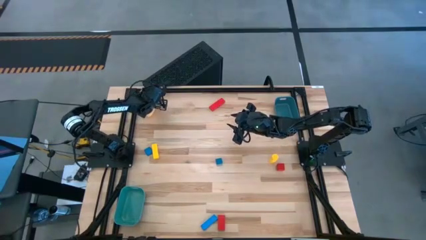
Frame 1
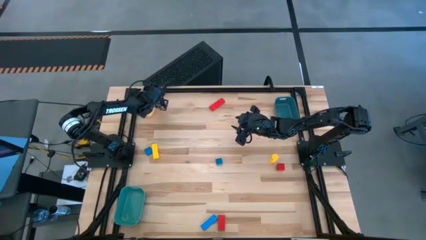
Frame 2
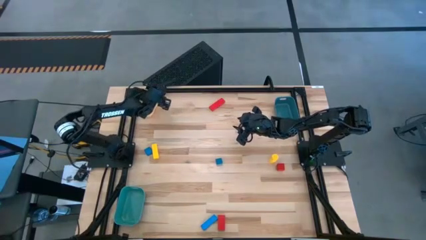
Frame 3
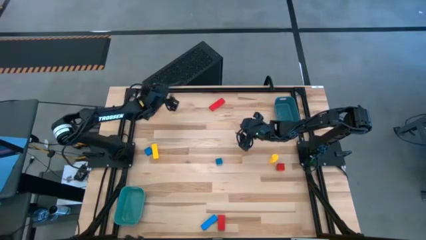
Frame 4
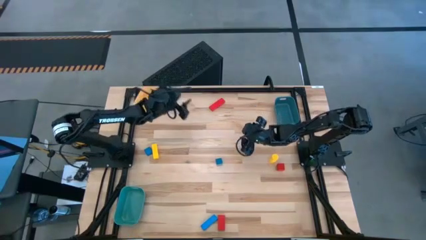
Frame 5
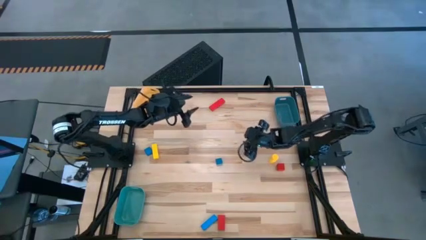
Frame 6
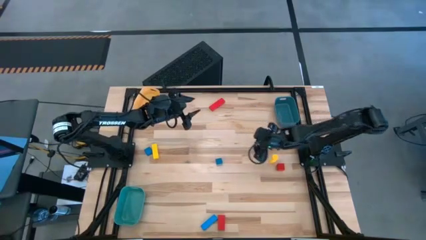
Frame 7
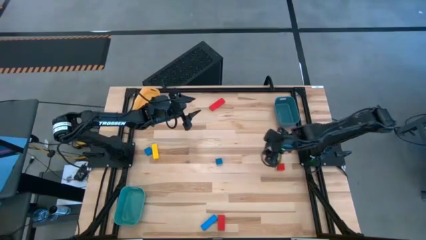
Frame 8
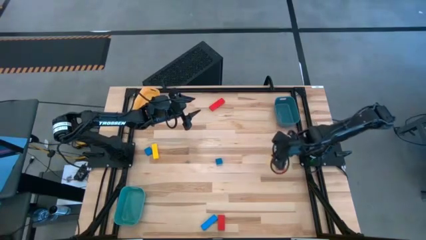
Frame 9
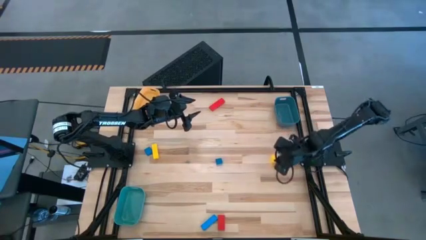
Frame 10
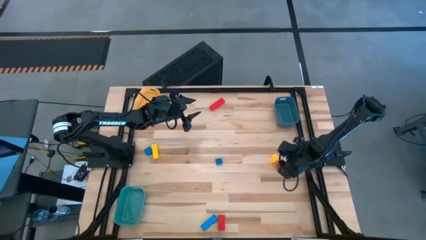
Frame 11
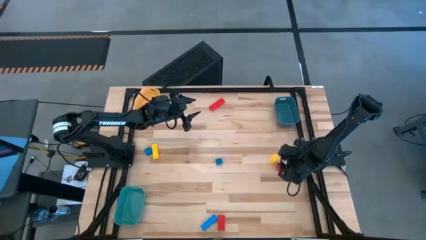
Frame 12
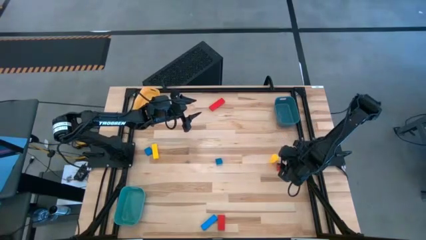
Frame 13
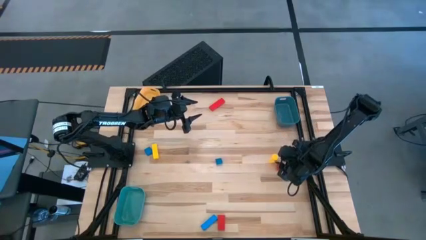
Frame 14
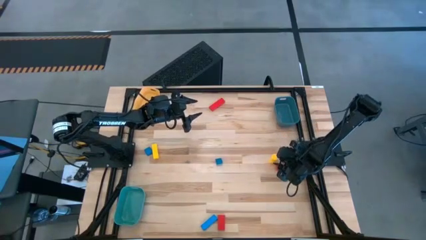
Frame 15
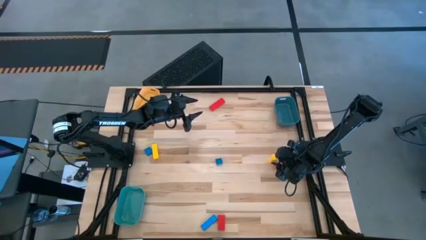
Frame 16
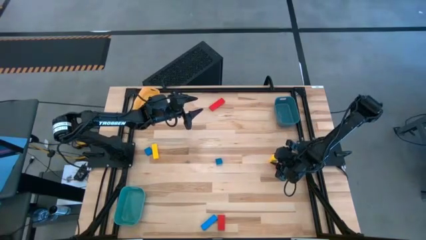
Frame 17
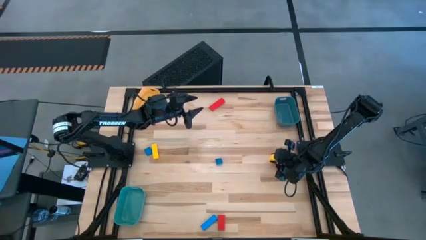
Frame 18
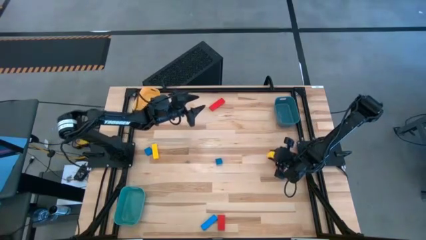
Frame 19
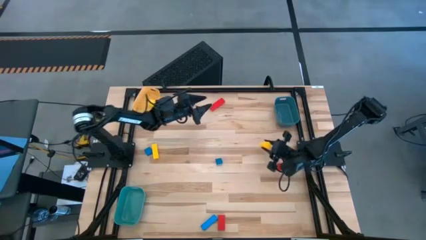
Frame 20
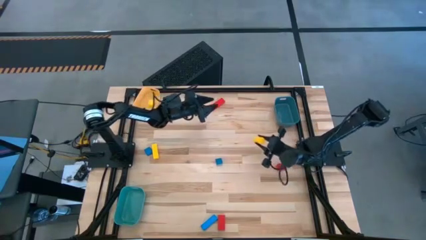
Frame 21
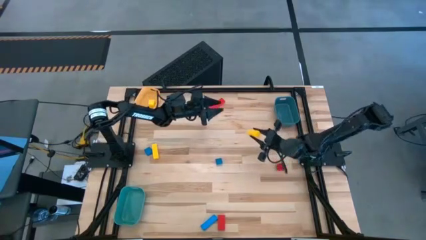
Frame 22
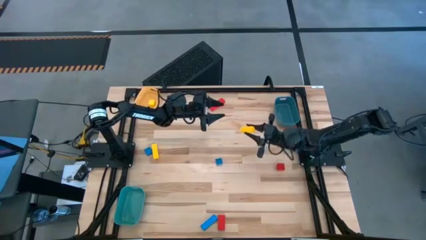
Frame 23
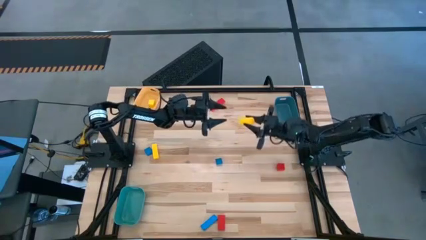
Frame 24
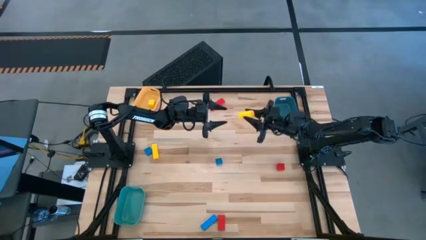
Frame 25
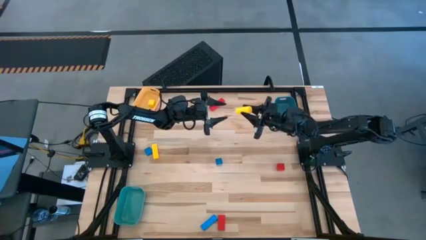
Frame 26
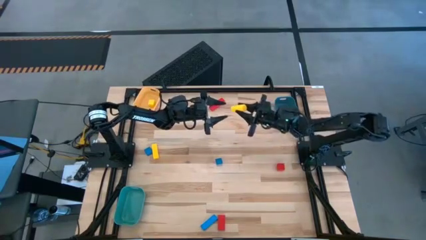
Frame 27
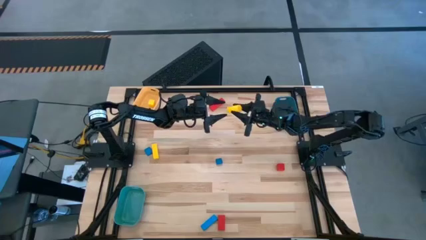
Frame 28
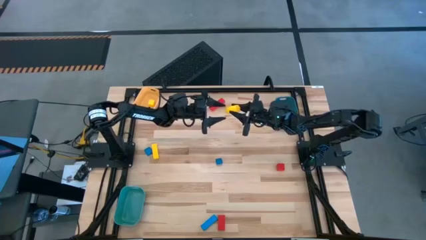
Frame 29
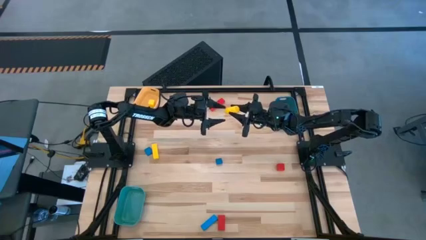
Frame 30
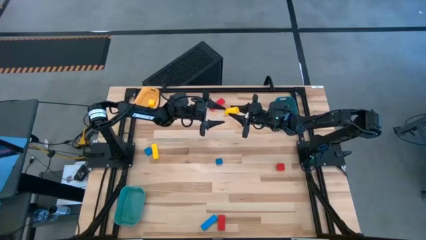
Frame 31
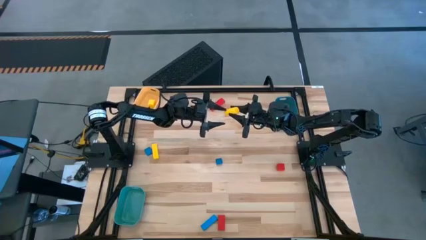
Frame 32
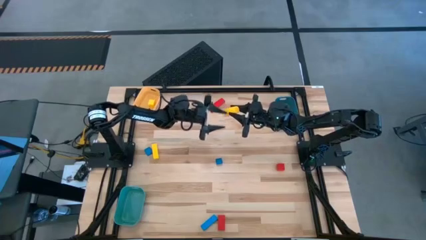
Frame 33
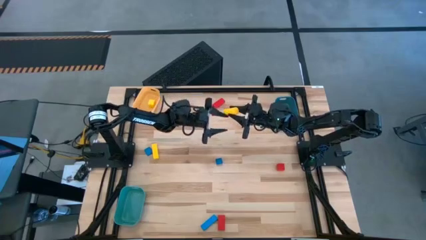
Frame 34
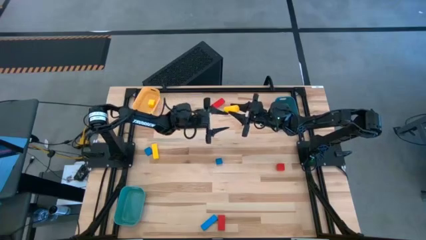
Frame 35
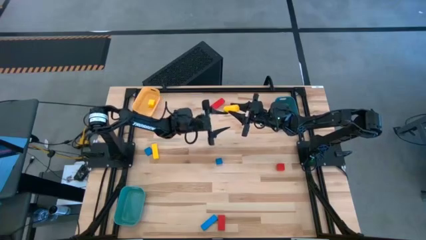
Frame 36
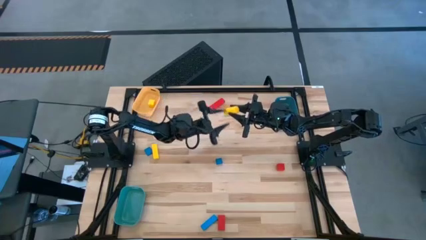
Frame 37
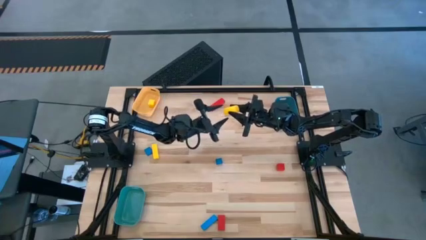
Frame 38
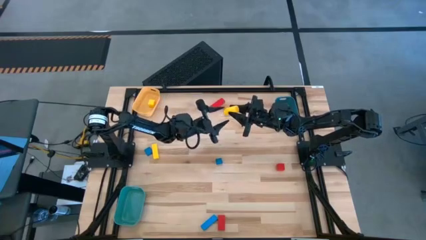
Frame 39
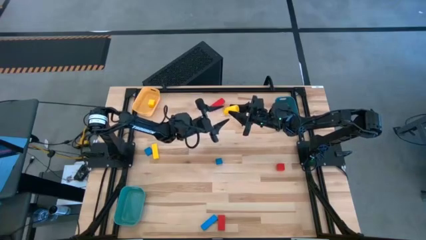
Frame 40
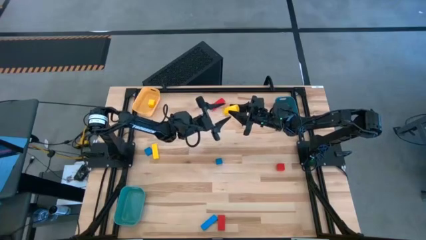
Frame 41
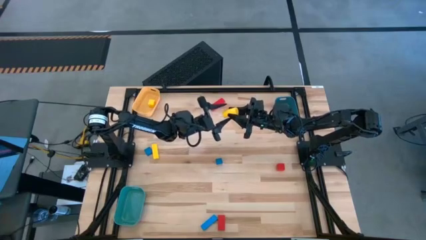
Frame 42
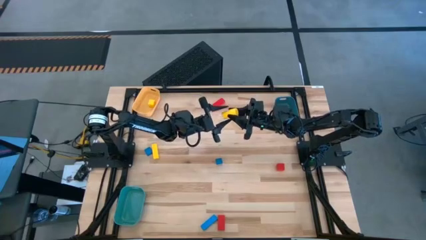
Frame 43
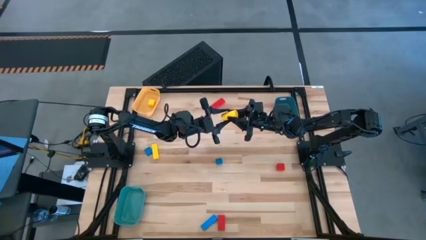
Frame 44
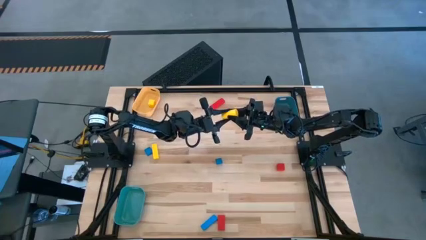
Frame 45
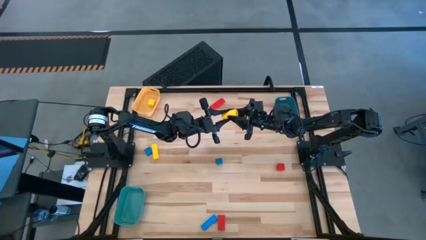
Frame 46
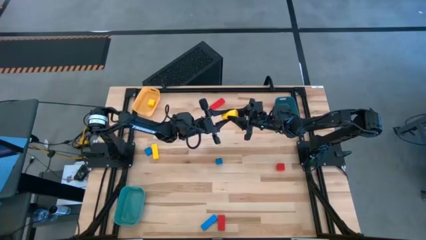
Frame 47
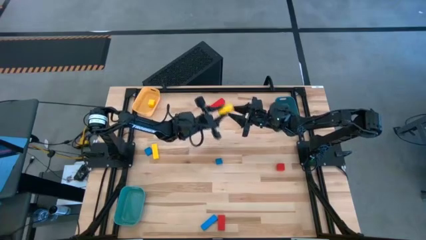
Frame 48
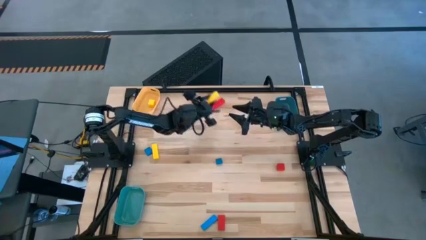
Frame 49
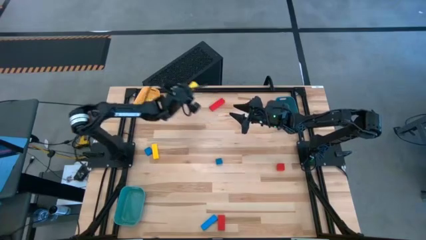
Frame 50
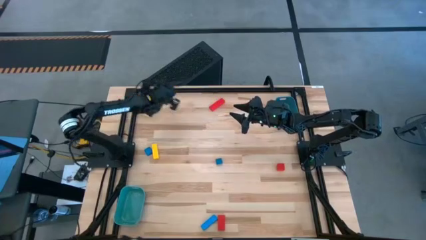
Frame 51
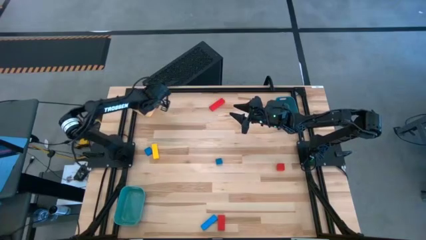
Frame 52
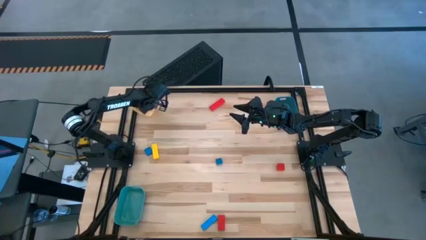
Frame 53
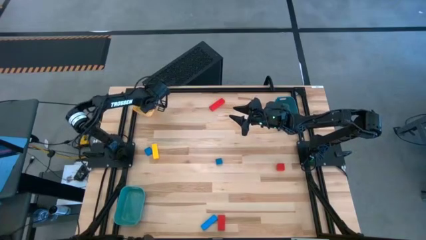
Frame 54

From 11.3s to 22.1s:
Task: Sort & place blocks by color
Put the right yellow block into the yellow bin

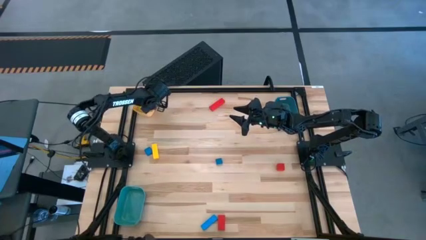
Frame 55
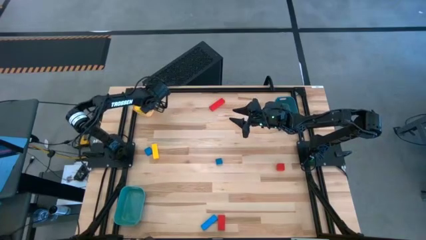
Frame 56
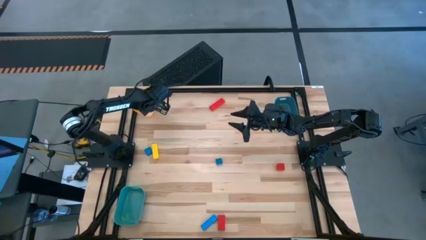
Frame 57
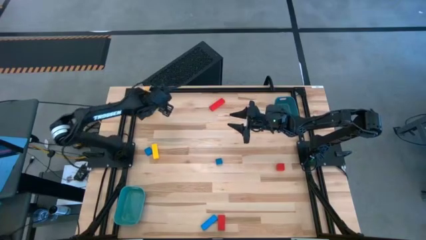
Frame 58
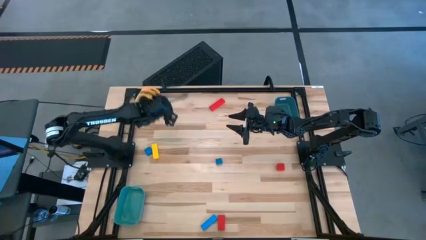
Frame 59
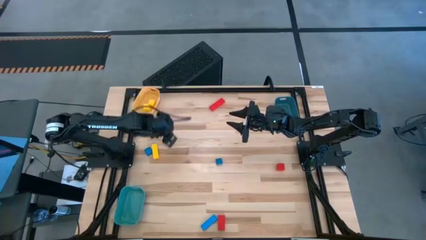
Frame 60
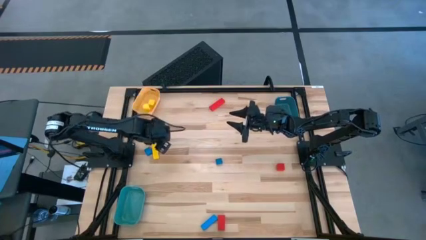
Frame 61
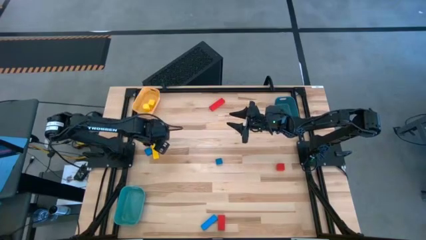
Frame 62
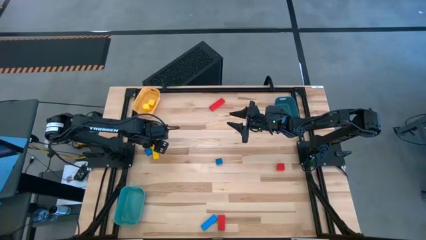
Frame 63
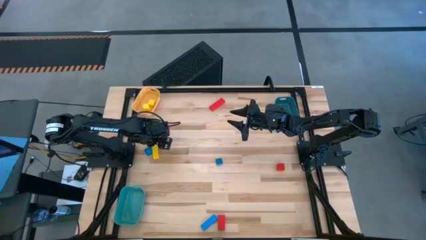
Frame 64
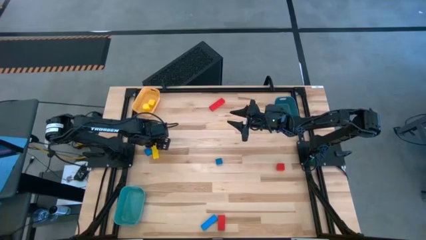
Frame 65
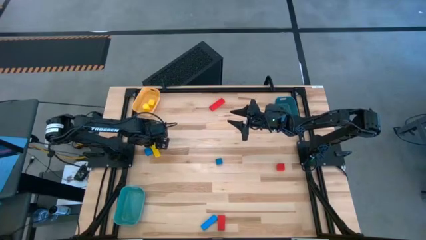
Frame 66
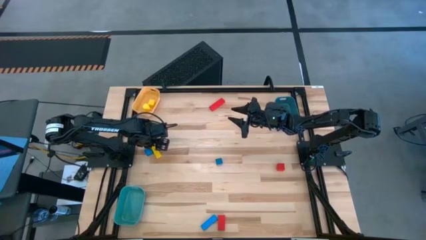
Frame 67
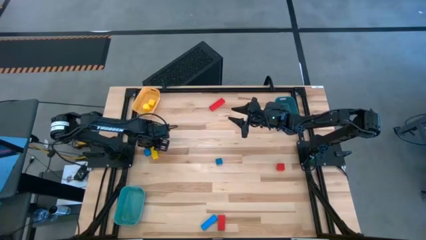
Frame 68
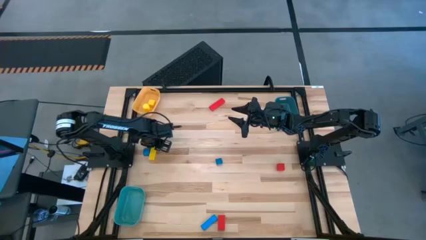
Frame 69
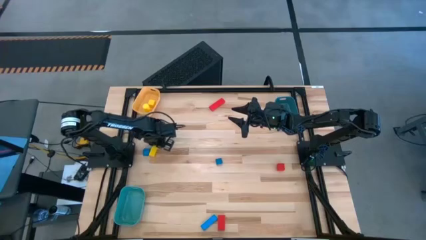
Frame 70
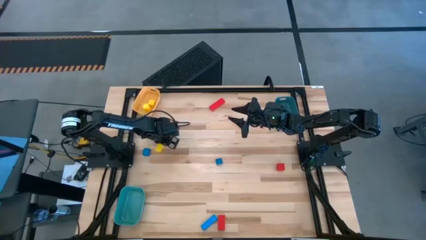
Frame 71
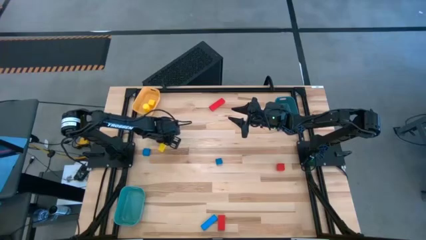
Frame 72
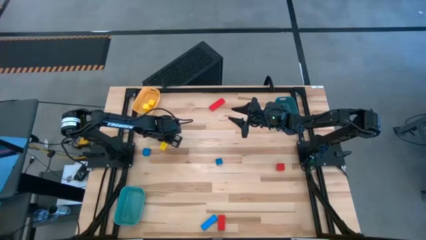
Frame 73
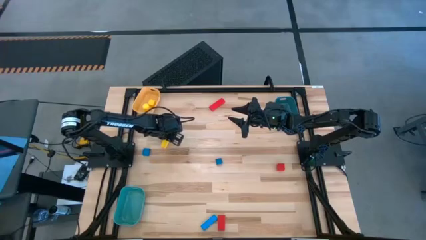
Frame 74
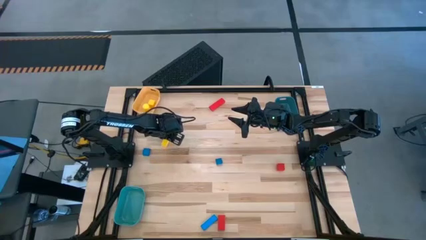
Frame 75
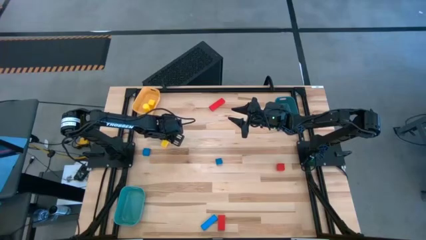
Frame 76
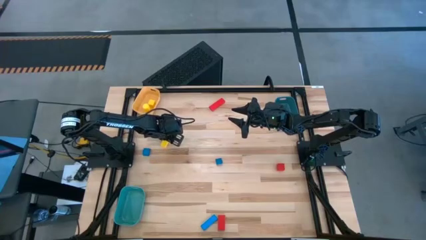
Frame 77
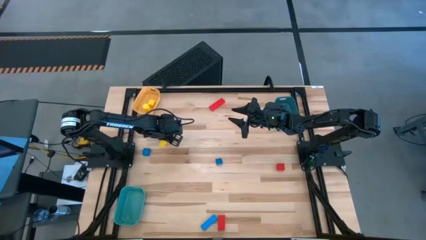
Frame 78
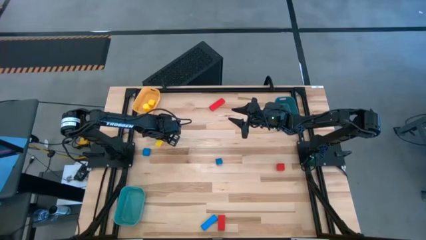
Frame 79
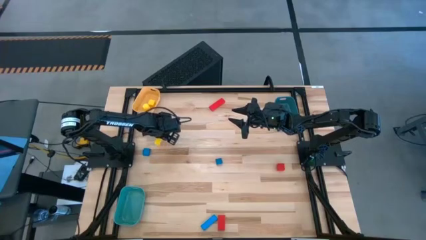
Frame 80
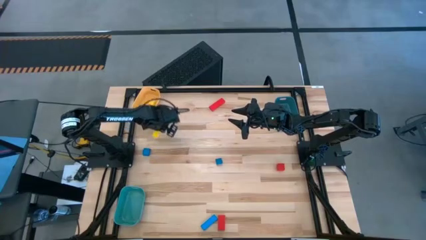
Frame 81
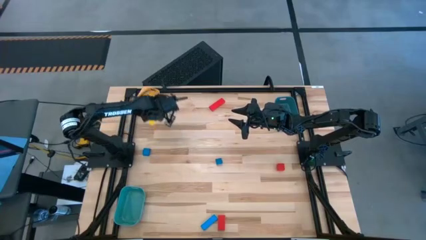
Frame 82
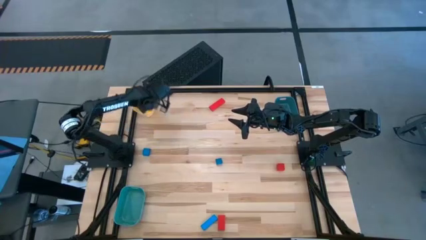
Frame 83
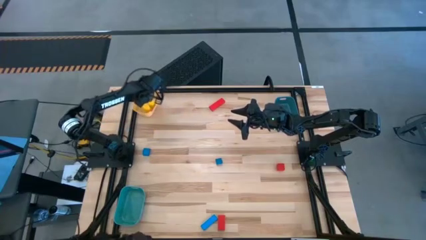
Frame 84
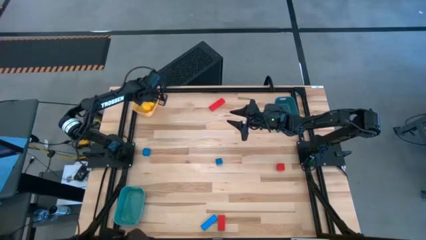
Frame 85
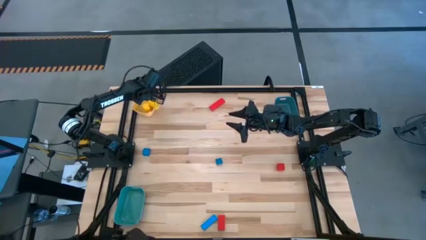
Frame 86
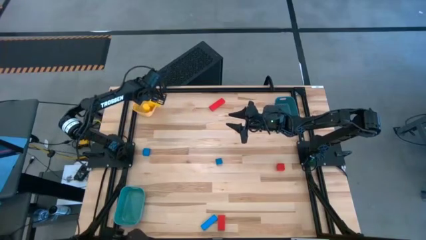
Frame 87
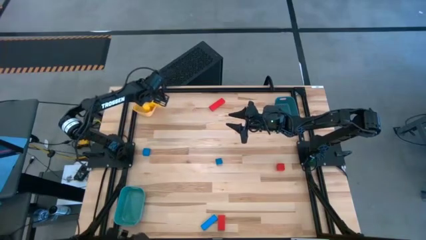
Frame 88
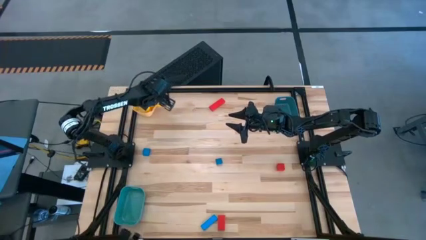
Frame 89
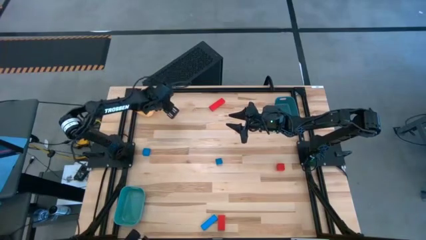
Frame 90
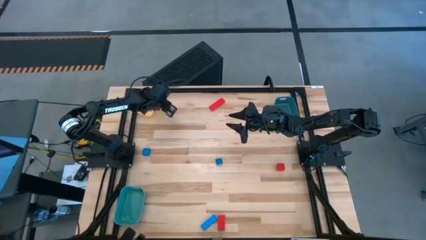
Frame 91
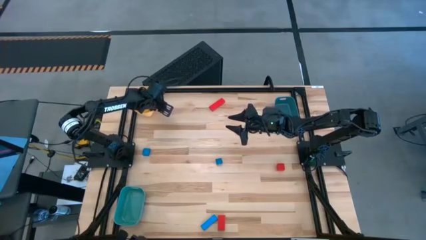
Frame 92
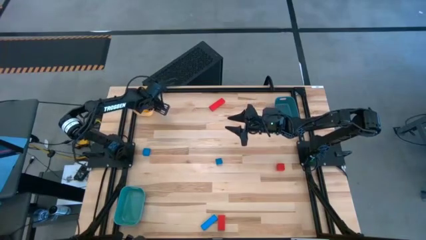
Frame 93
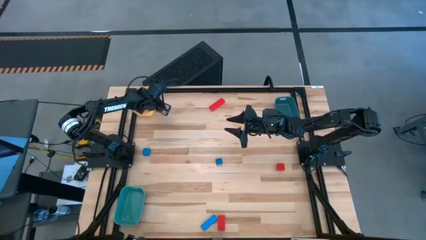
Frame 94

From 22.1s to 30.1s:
Put the yellow block into the yellow bin
